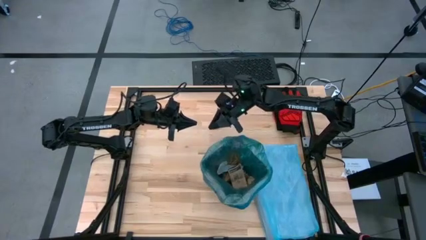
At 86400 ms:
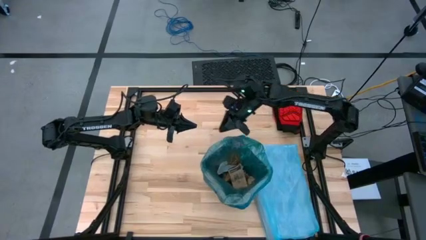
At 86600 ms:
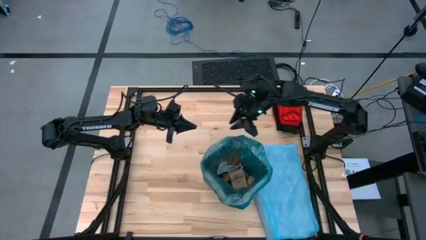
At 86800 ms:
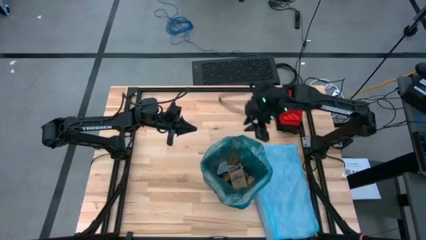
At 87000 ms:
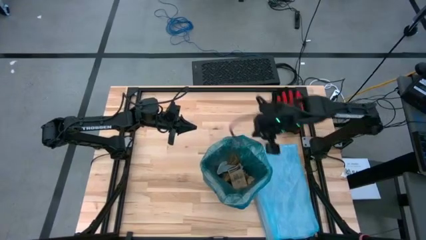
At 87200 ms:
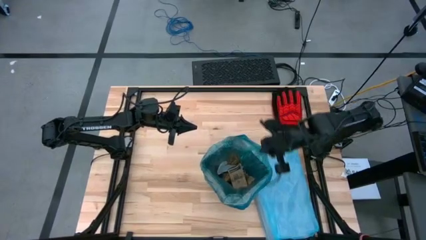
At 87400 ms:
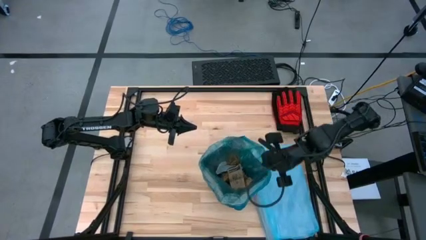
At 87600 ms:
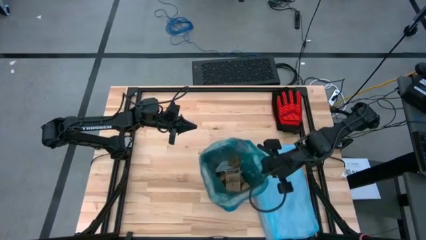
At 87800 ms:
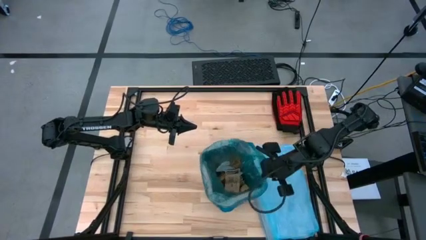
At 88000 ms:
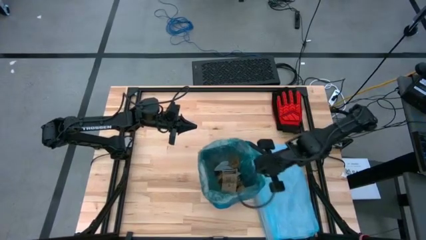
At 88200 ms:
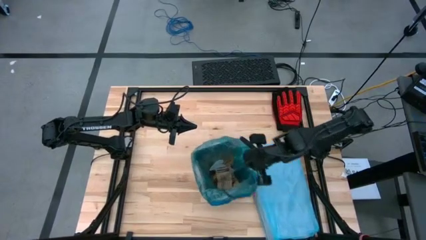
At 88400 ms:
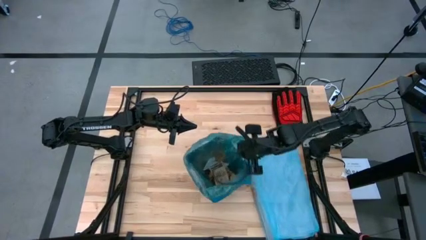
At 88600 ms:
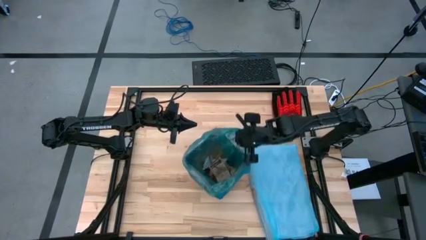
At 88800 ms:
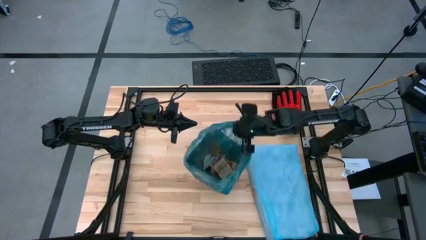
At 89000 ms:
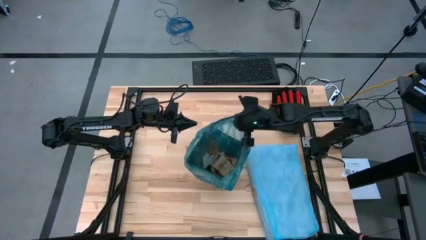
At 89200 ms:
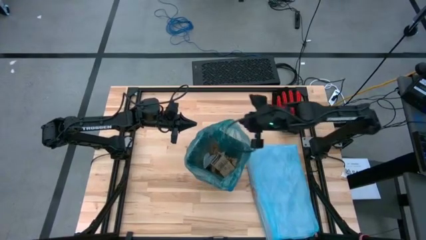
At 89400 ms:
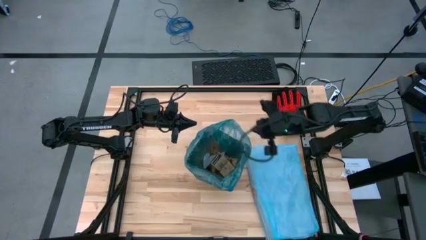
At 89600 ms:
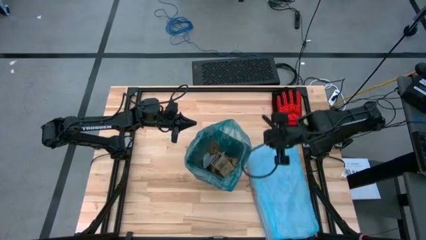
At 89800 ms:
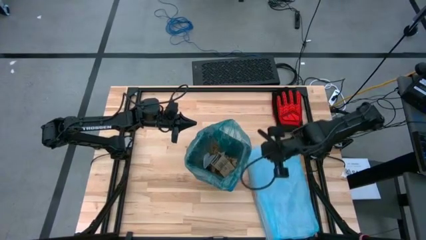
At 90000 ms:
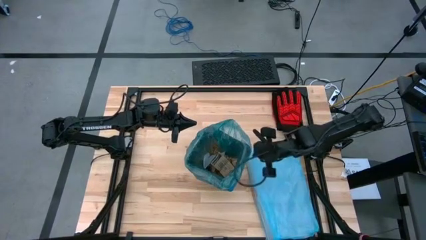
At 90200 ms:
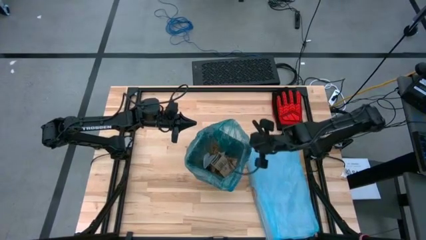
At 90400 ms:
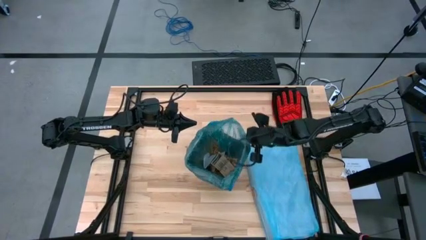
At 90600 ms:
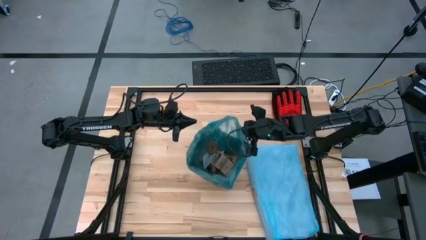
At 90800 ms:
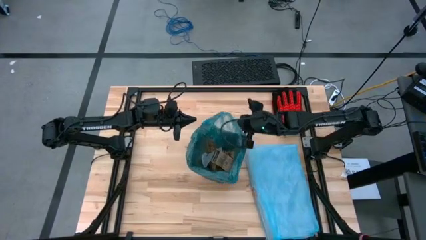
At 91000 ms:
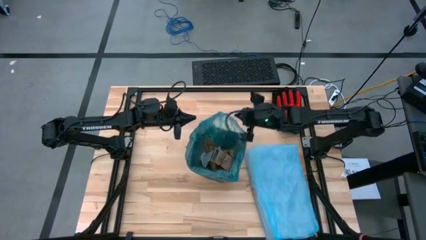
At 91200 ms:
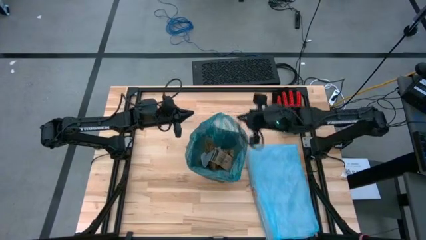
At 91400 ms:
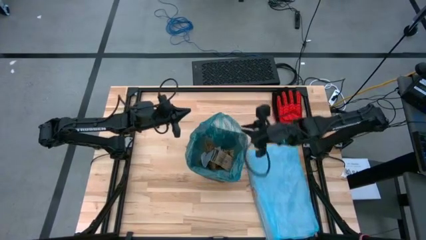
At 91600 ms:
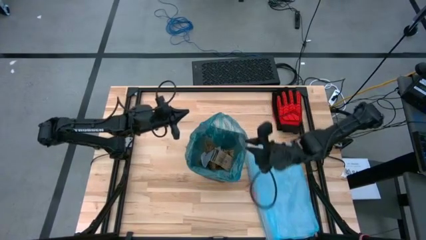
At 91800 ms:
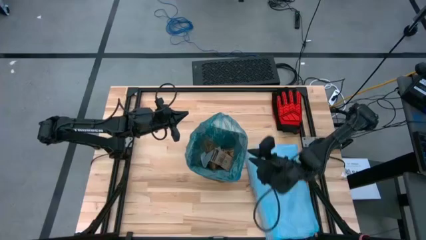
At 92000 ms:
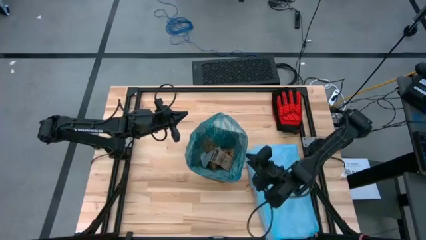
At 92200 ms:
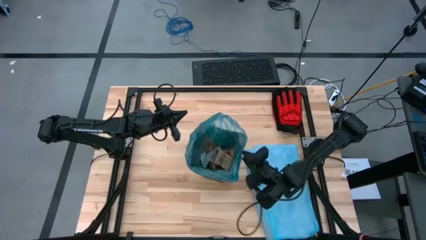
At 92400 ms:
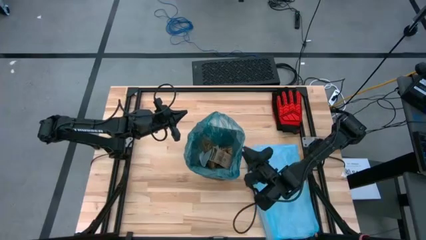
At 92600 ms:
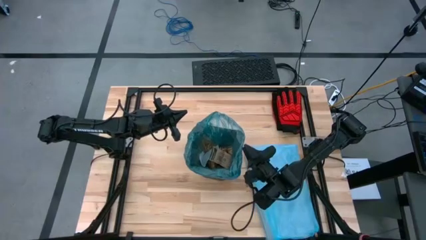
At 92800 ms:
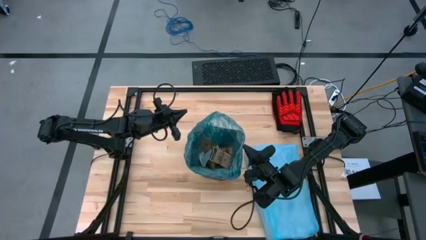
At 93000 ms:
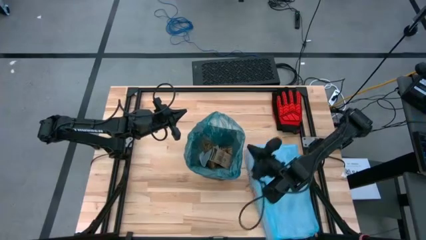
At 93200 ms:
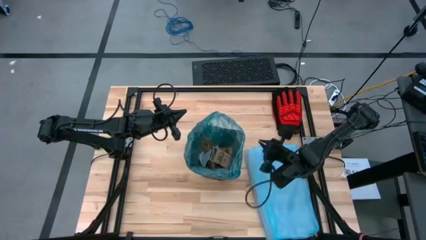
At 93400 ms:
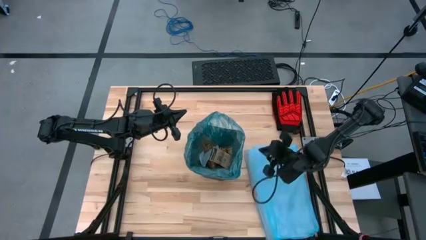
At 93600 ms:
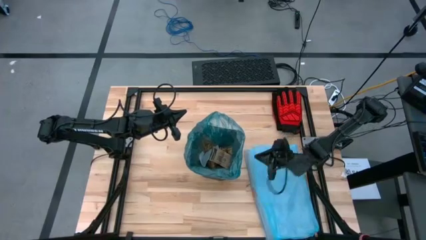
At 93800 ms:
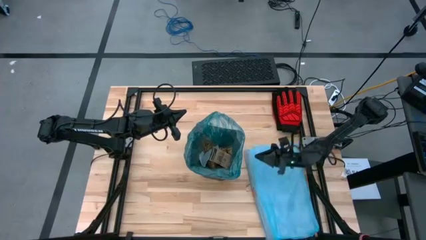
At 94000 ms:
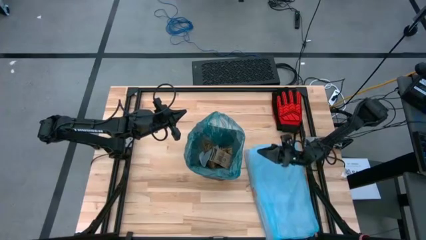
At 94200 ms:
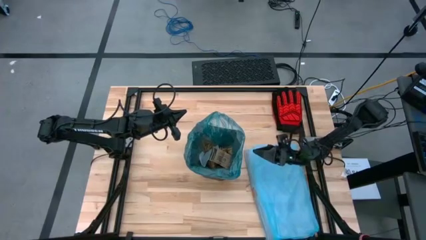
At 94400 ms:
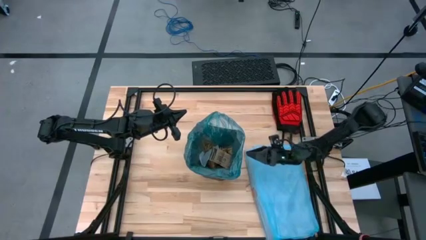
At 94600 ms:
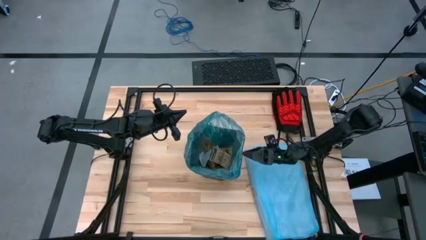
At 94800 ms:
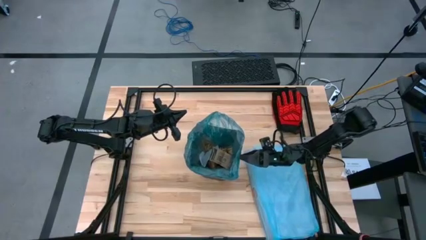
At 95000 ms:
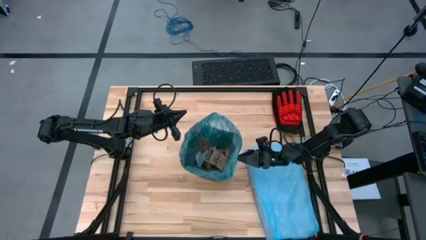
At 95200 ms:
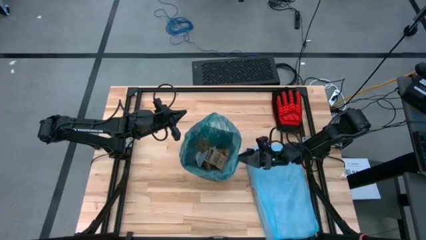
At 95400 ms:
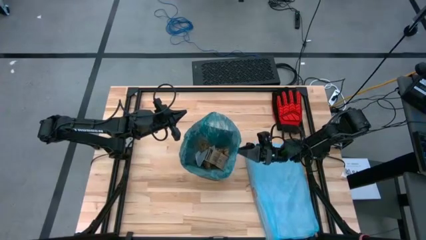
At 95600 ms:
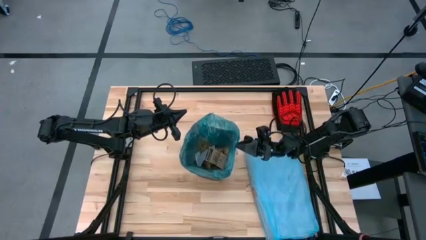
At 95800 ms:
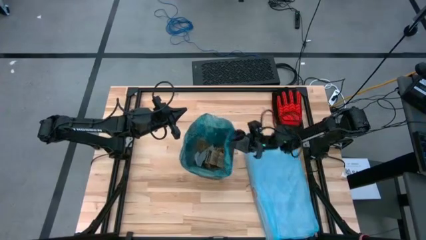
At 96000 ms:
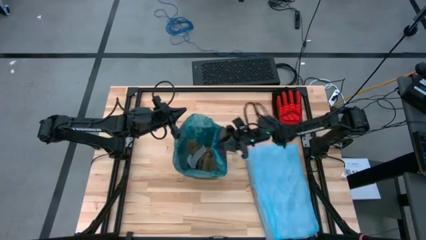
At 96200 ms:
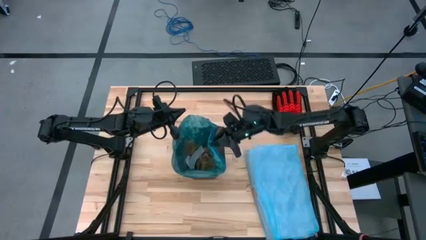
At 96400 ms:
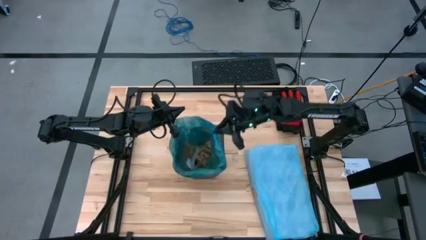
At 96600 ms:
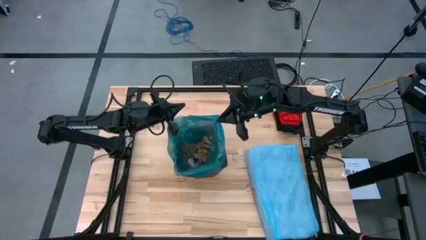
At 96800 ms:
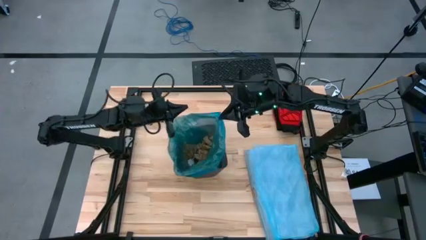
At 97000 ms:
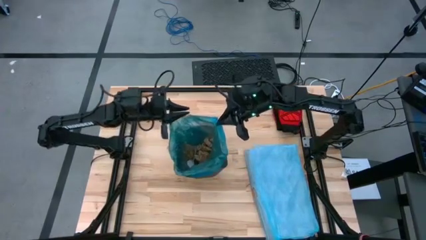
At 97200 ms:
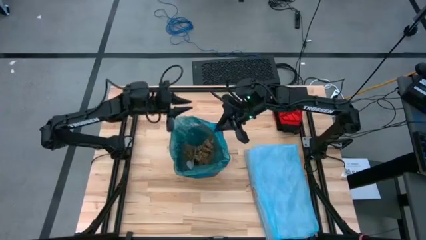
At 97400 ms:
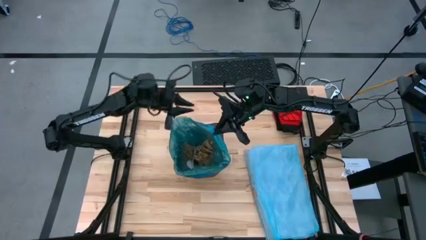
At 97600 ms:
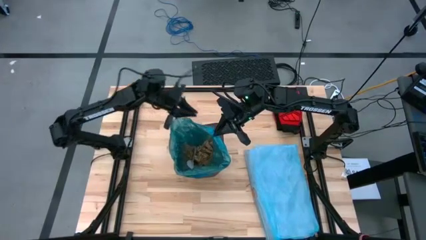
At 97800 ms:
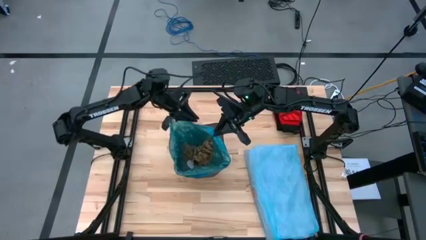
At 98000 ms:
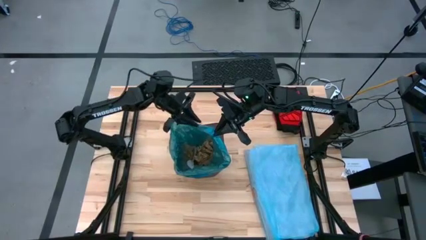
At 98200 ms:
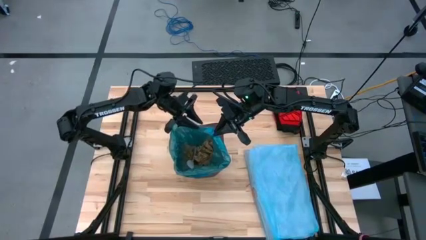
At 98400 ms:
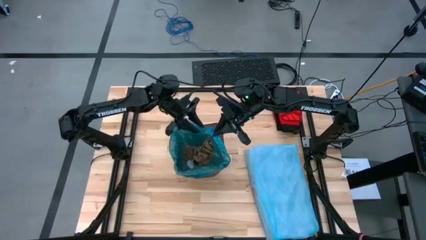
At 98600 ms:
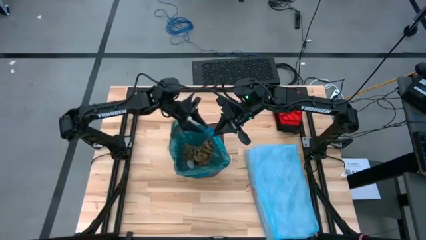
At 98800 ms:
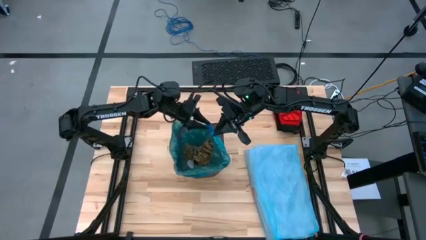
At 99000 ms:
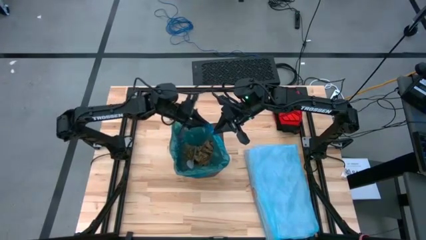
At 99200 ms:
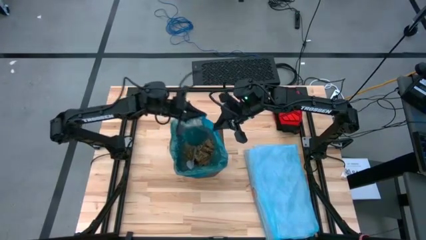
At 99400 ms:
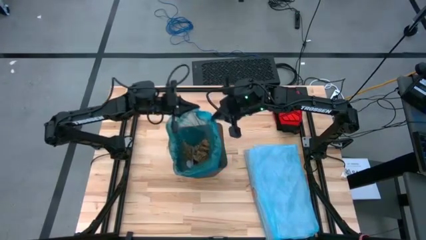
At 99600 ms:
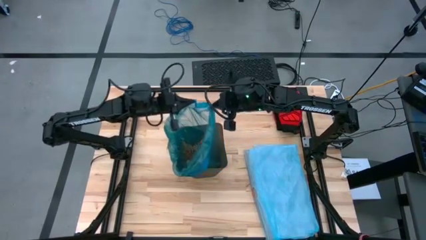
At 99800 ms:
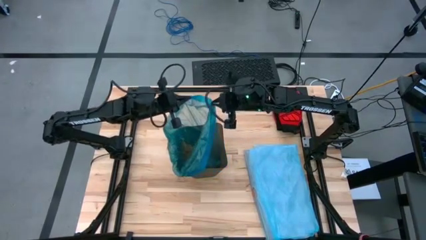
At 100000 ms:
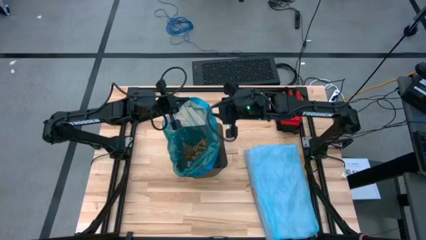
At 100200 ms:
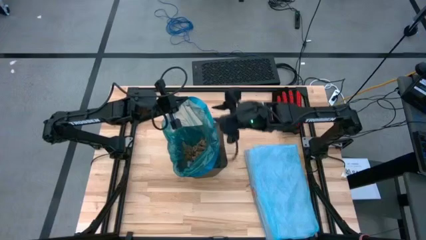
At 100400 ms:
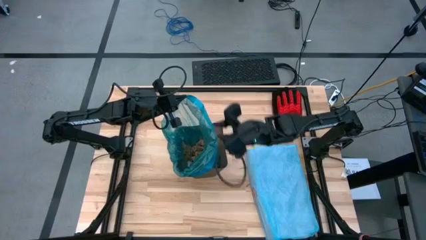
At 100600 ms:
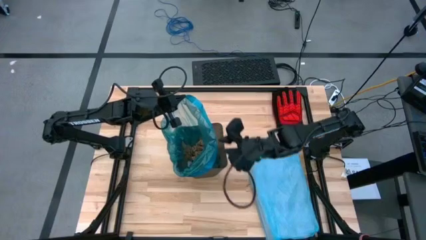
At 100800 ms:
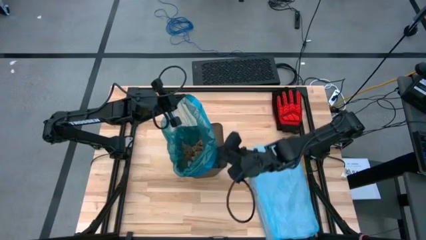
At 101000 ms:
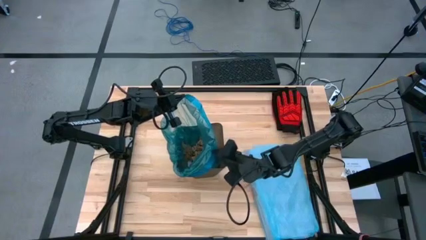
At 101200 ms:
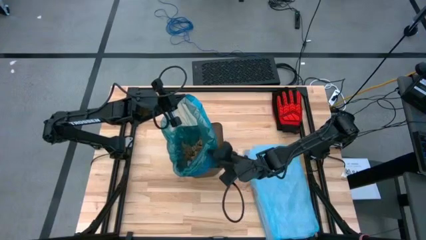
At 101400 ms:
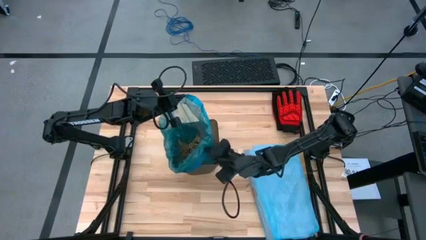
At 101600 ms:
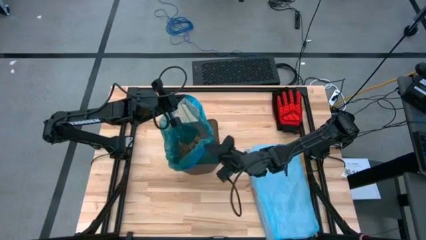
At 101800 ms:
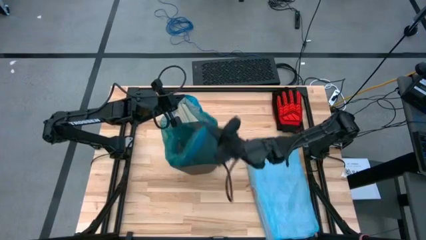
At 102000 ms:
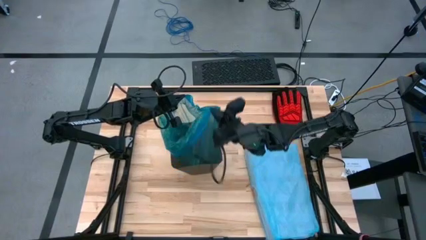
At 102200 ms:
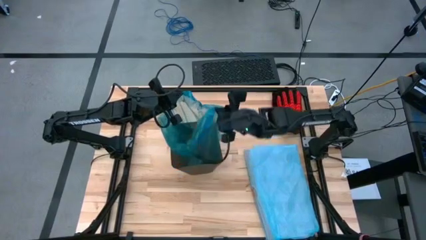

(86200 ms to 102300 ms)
Task: place trash/remove bag and relplace
Remove the trash bag from the bin
